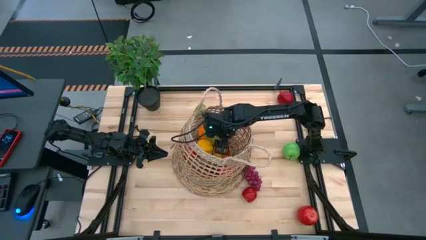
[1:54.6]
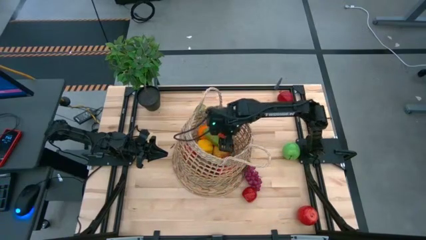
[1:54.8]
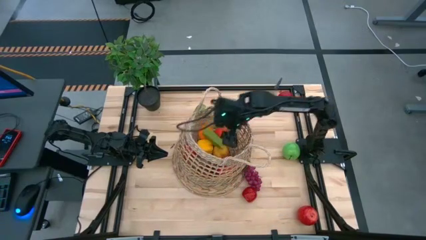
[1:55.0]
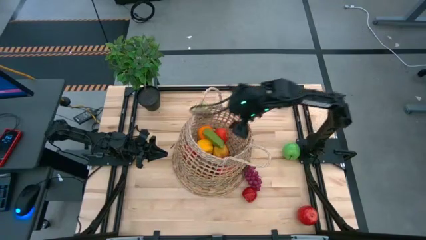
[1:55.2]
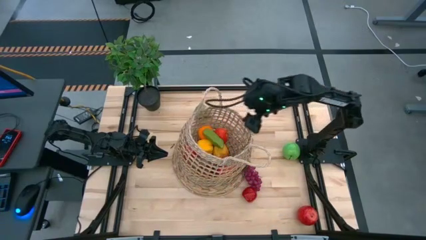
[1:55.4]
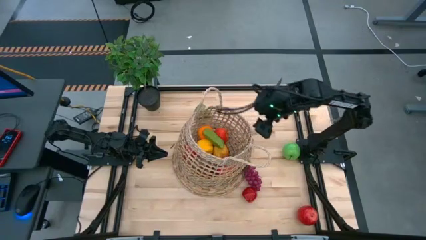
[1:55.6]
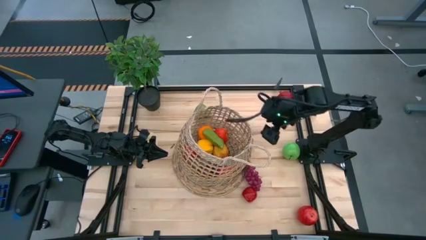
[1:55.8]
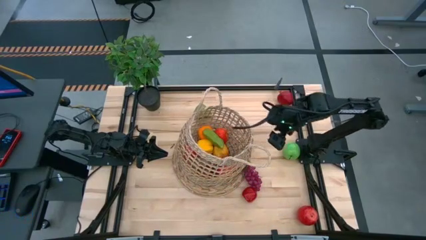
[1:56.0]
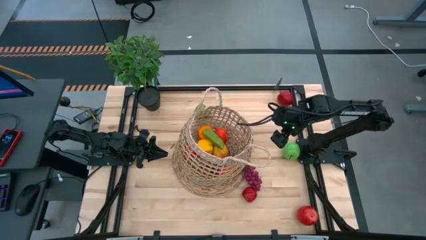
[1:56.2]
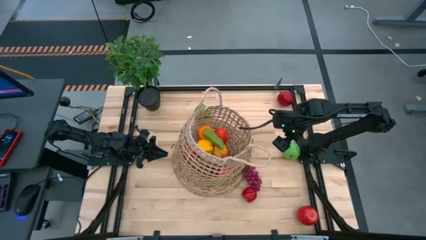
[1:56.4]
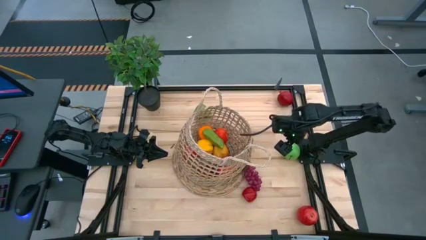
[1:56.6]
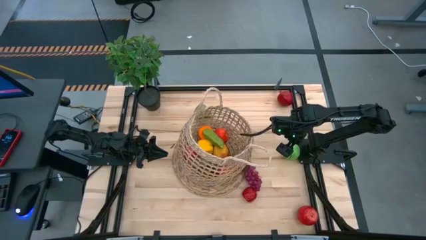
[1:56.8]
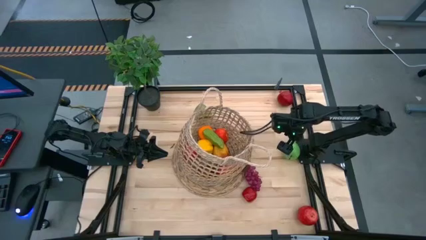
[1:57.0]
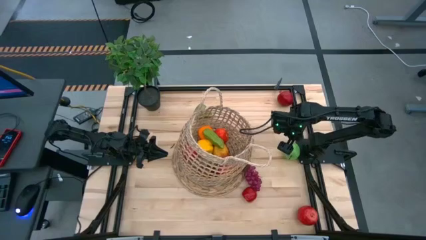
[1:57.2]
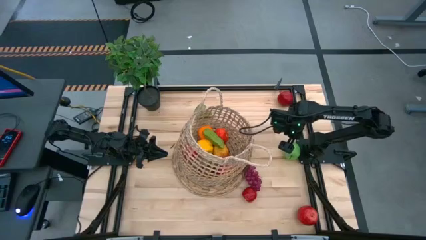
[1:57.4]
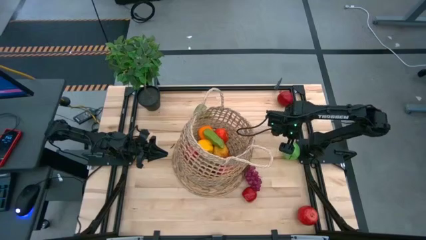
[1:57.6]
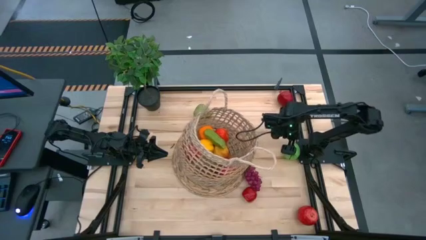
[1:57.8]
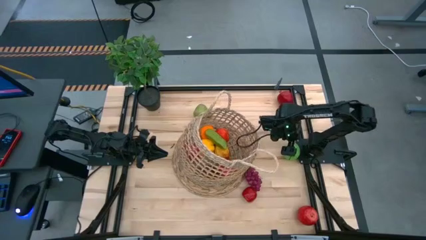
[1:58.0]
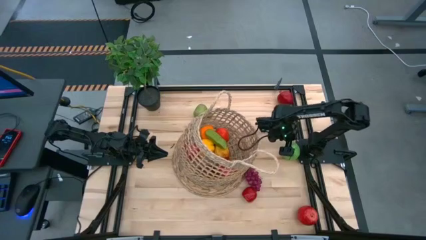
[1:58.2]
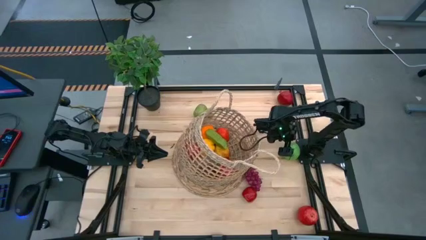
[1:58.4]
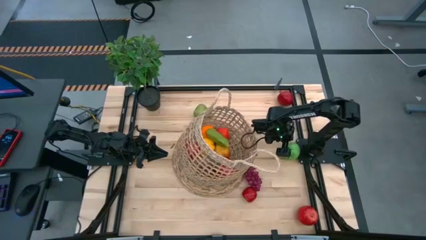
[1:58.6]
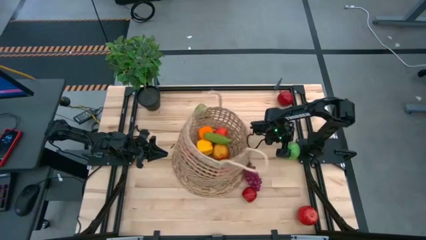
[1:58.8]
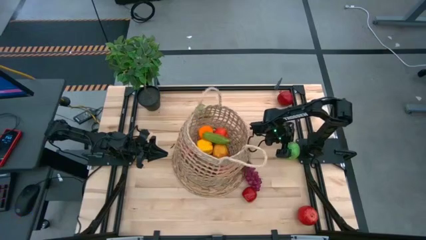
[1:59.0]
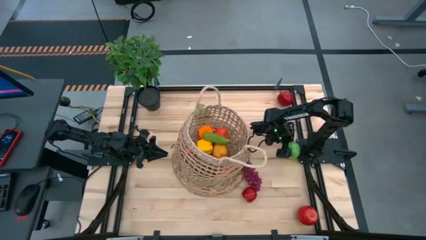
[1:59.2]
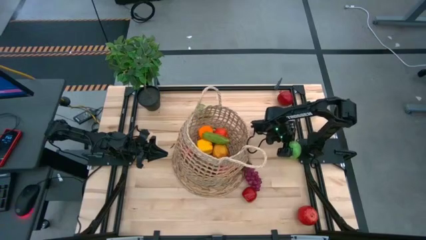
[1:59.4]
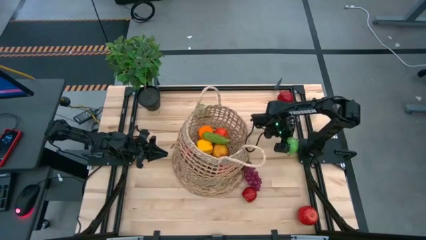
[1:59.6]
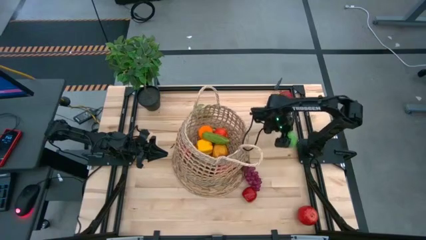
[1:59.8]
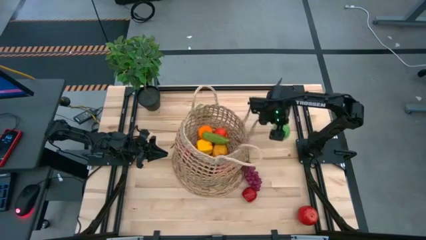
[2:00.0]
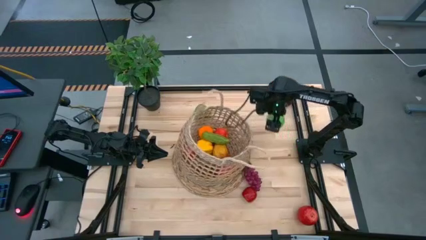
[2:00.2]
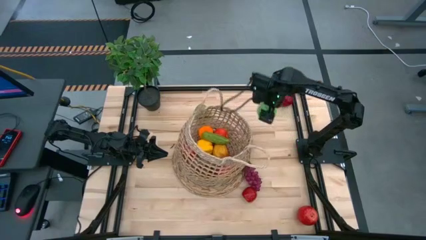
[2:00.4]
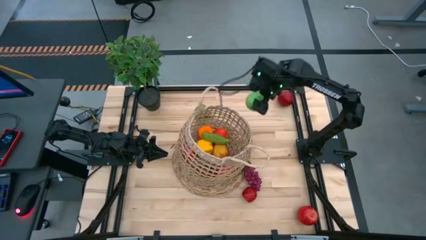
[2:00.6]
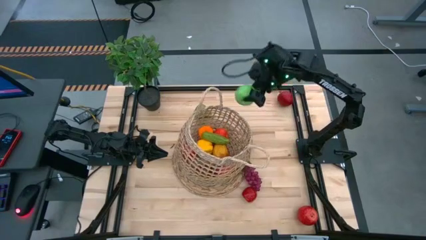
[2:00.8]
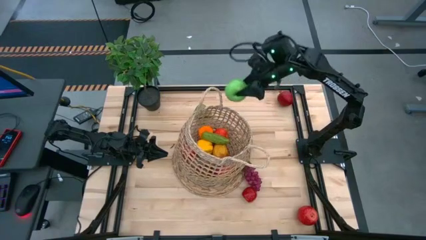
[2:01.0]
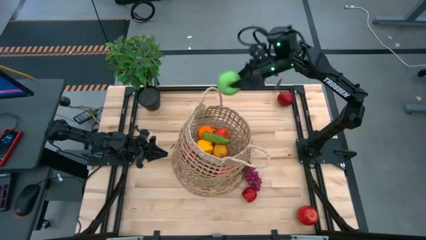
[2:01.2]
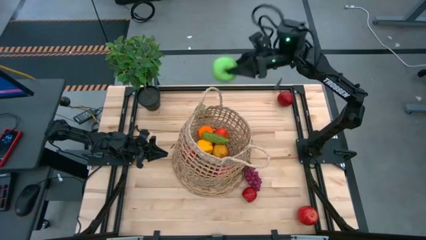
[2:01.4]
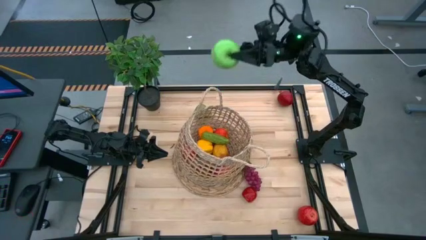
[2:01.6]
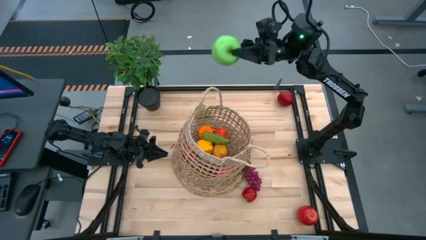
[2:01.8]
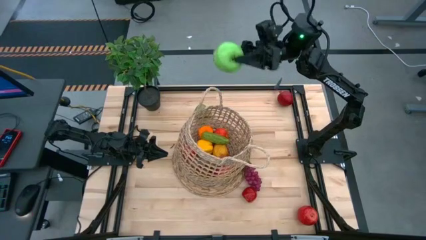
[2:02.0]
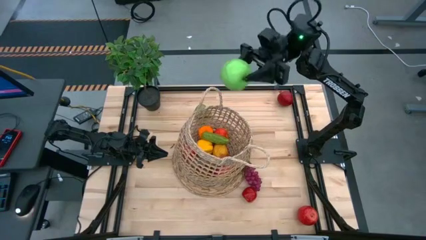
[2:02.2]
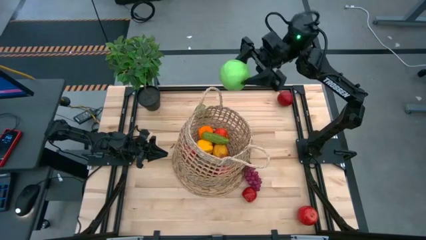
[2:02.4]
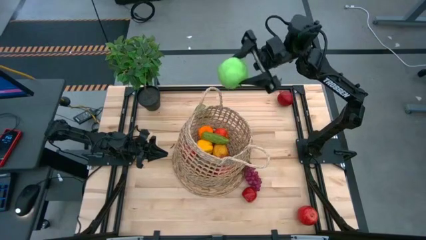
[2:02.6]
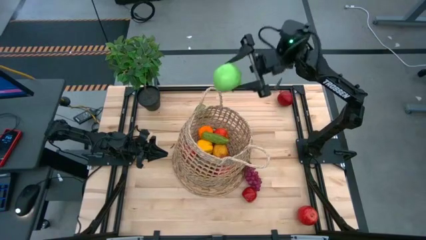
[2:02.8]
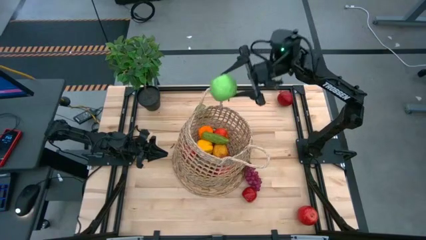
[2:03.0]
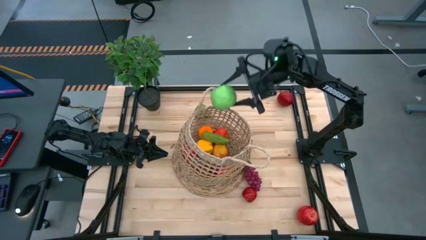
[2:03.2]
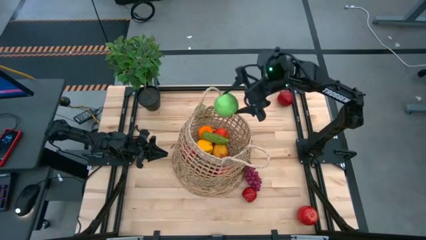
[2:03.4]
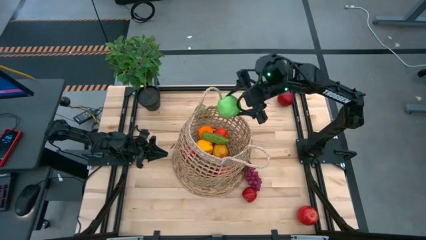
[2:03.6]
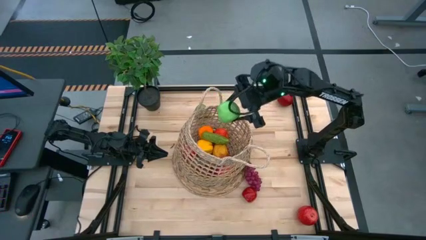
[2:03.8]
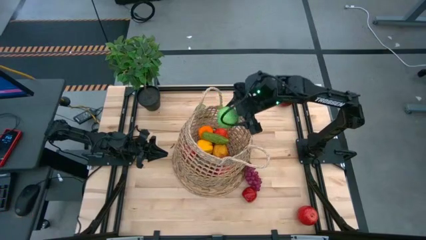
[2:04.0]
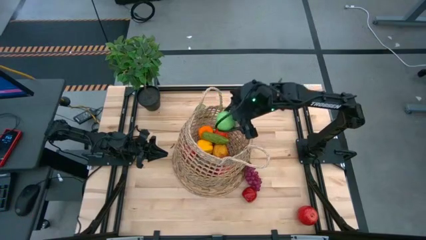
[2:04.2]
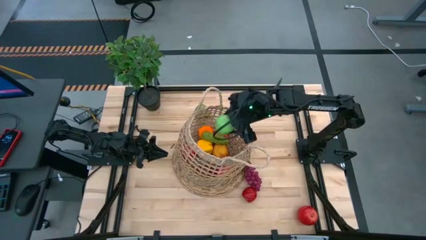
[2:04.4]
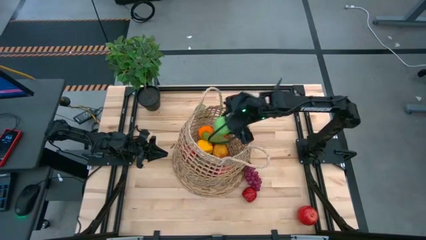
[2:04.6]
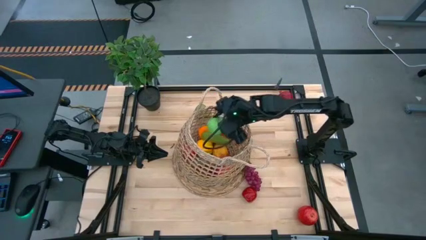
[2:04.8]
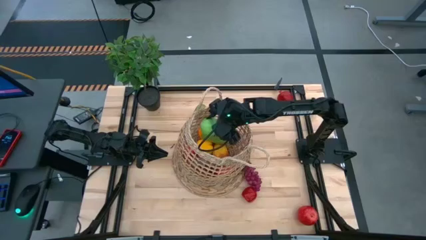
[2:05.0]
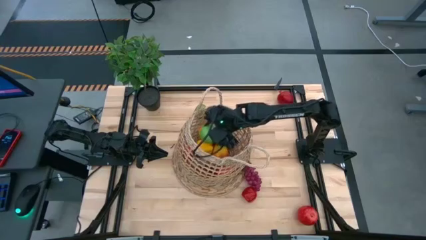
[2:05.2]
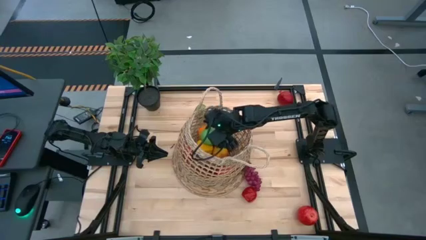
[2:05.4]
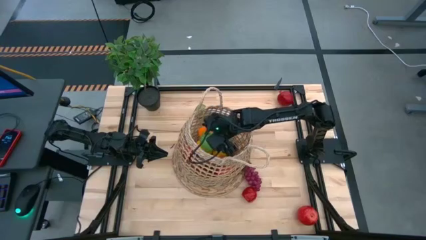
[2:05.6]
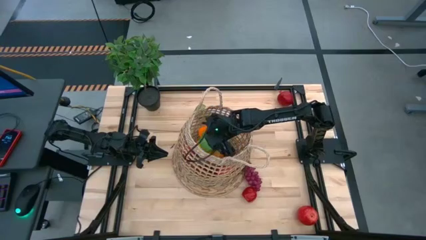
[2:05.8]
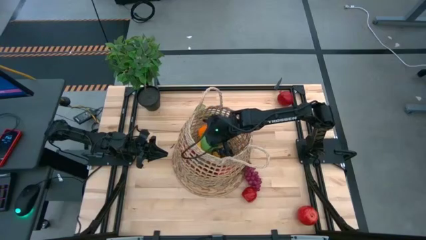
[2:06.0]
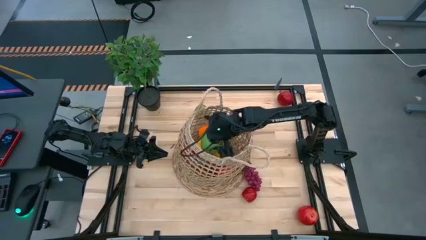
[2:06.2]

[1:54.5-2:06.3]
Task: Build produce basket
Put the green apple into the brown basket

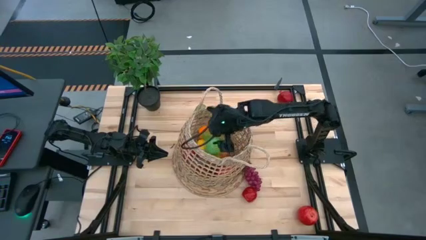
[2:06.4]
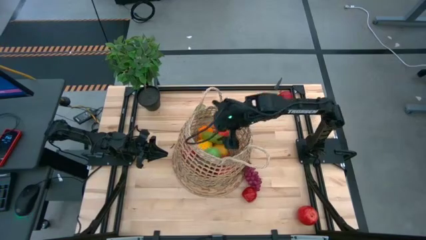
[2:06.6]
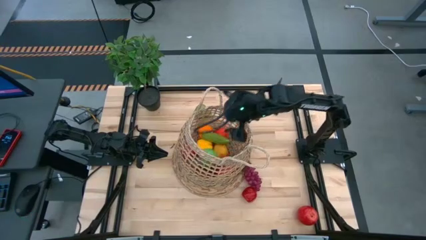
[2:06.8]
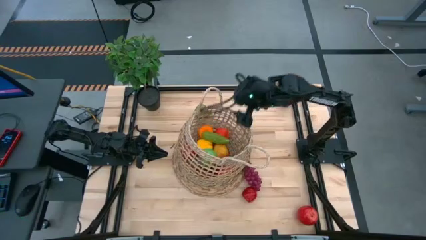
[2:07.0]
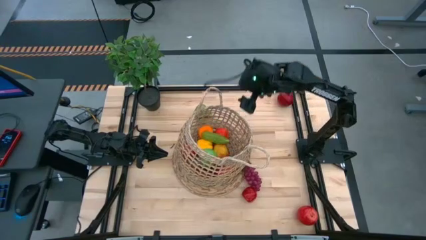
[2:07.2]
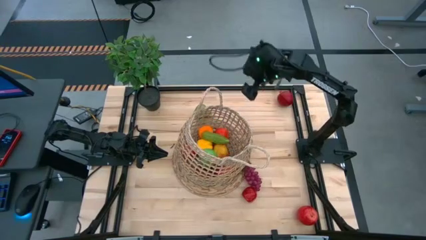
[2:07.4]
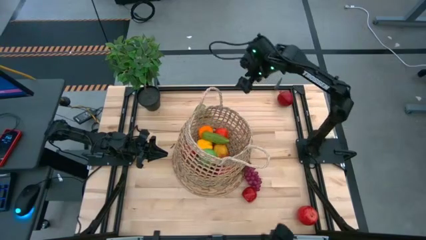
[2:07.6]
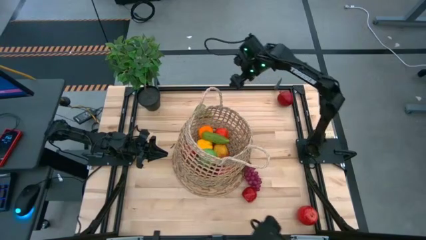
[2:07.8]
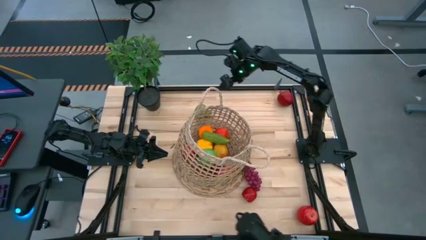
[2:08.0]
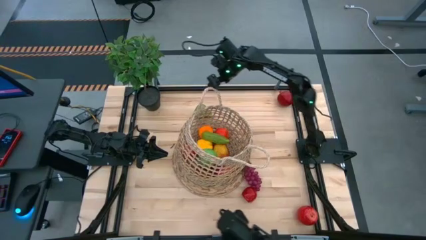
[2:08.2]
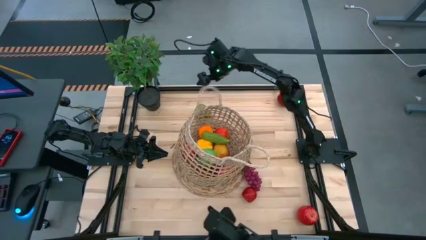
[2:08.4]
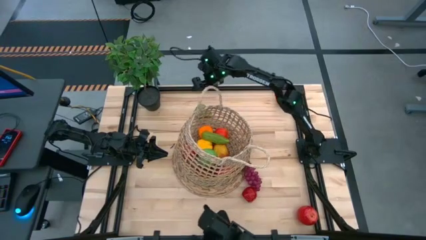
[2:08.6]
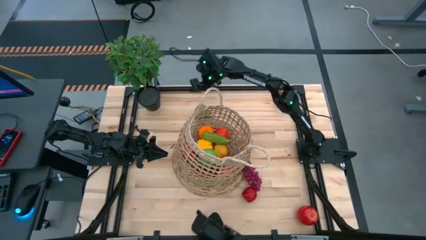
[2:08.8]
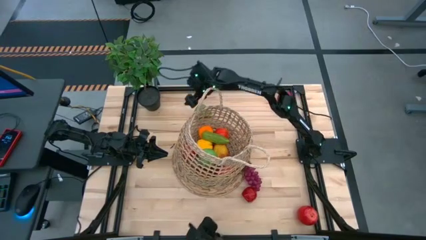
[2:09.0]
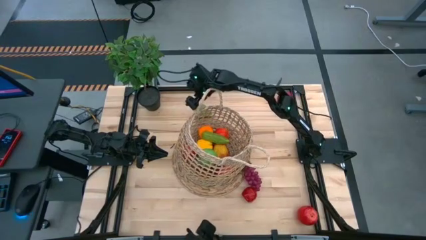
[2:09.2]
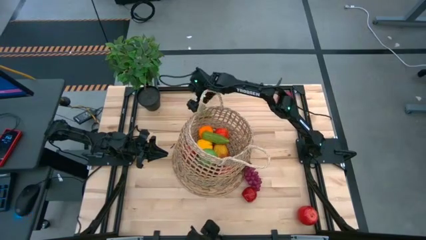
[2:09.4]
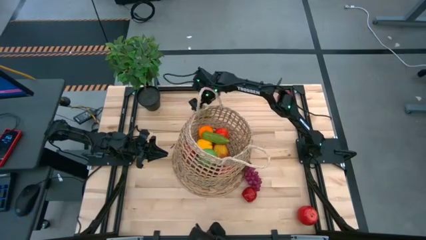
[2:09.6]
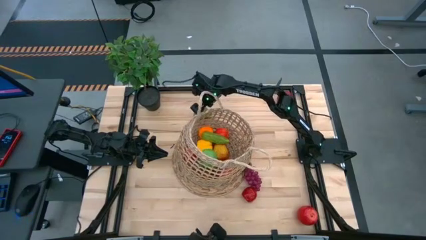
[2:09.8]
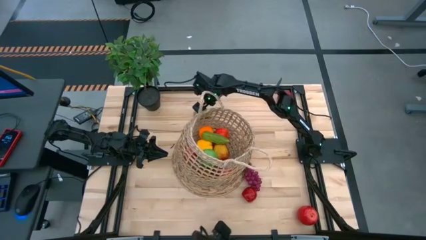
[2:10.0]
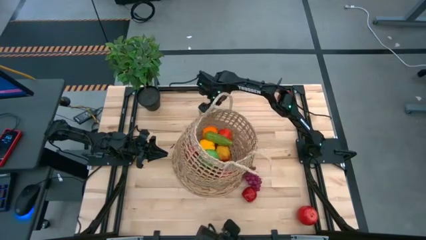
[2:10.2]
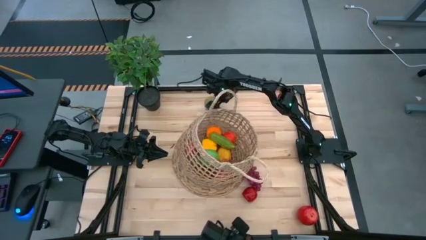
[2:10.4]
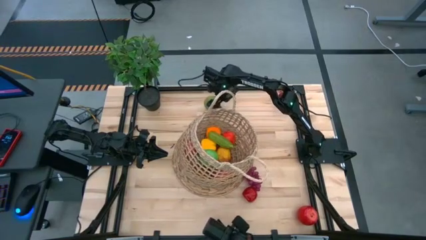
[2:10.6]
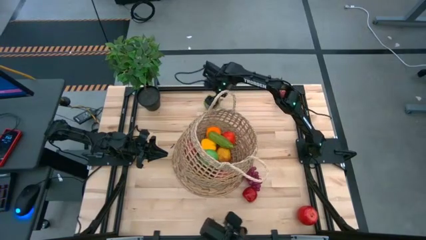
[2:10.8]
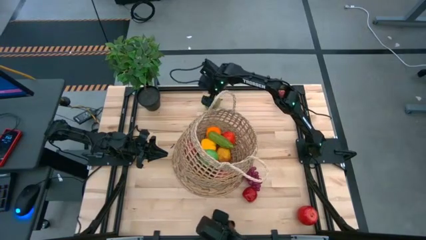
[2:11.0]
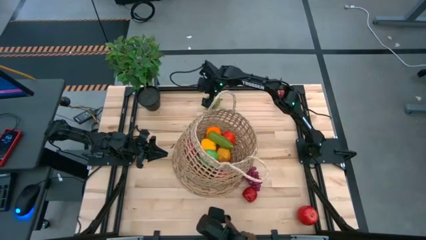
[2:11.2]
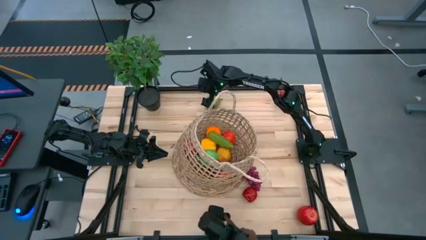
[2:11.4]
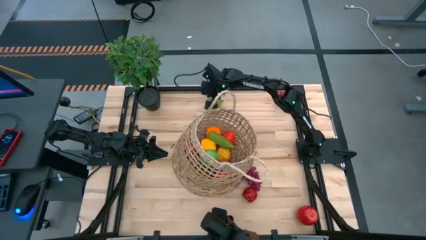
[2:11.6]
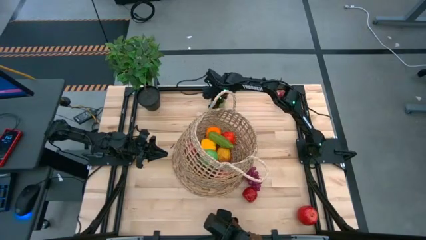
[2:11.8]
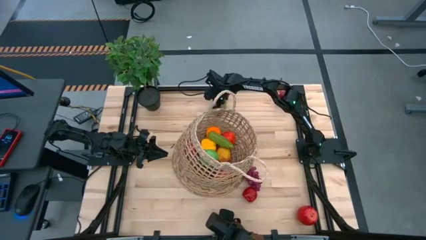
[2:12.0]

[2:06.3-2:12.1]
Put the green pear into the brown basket
